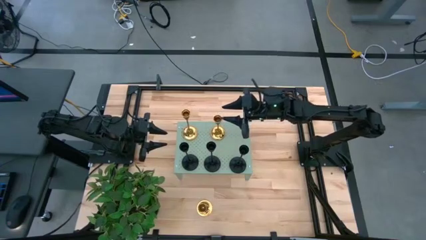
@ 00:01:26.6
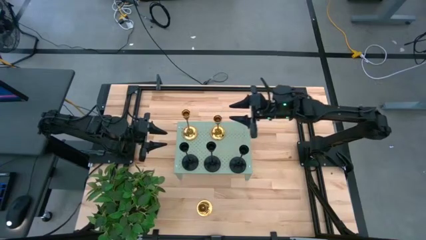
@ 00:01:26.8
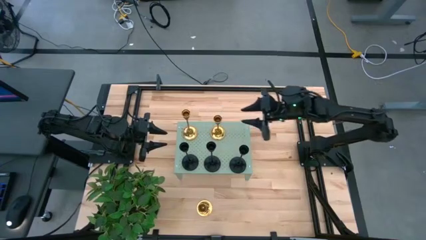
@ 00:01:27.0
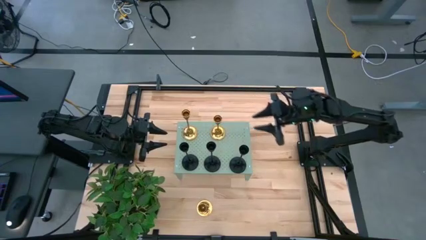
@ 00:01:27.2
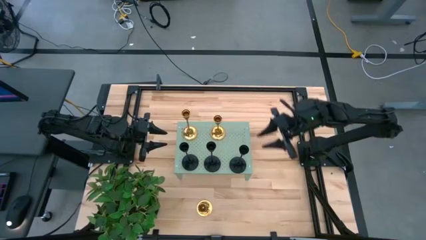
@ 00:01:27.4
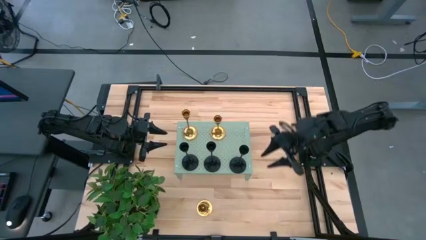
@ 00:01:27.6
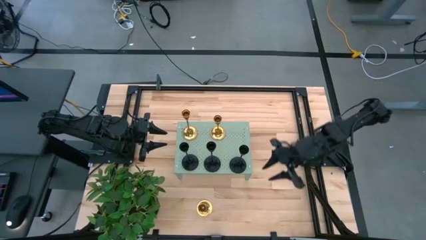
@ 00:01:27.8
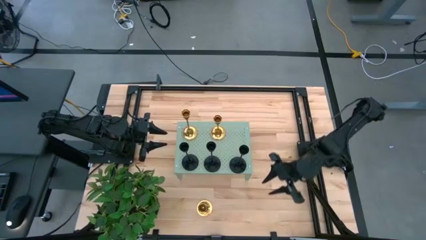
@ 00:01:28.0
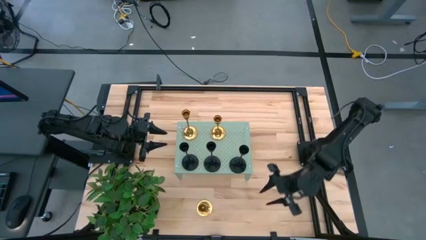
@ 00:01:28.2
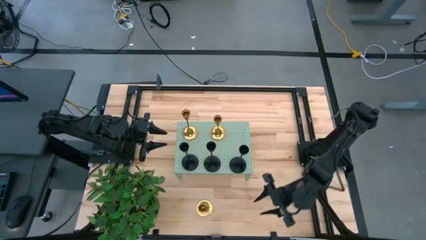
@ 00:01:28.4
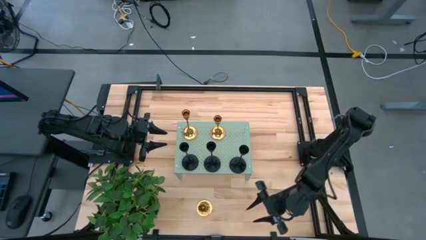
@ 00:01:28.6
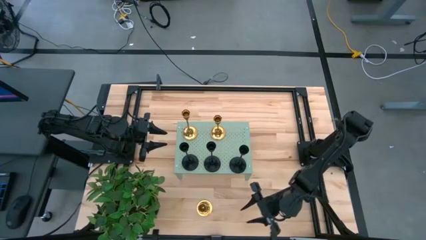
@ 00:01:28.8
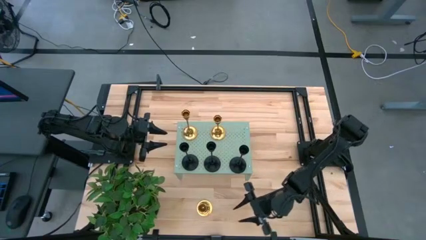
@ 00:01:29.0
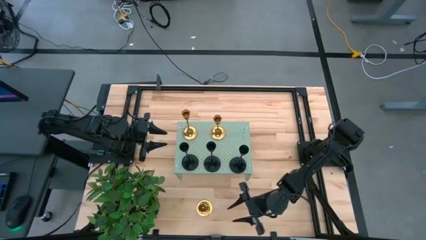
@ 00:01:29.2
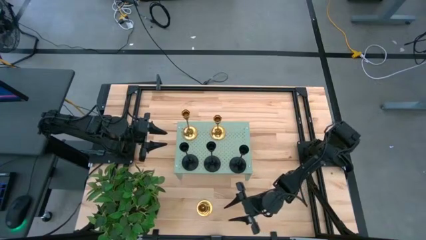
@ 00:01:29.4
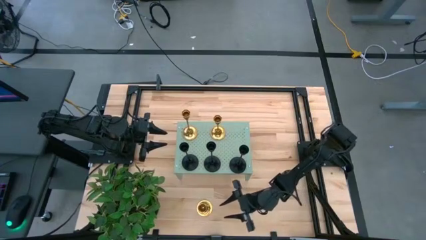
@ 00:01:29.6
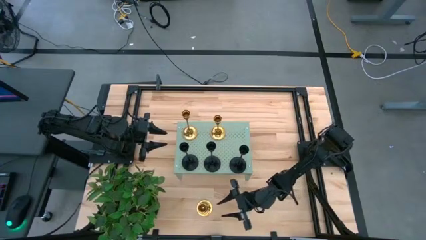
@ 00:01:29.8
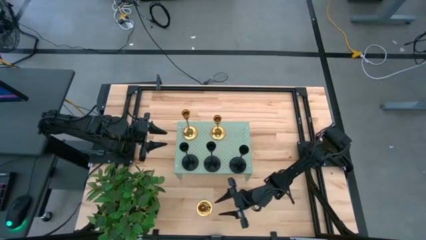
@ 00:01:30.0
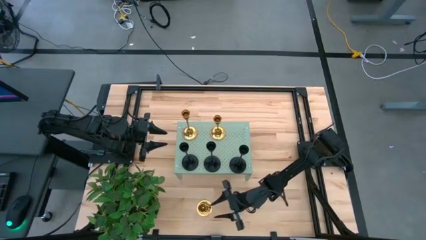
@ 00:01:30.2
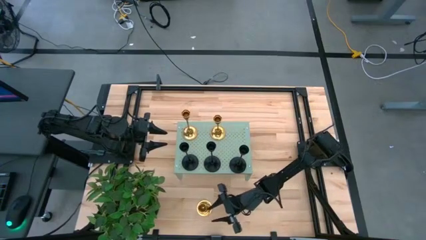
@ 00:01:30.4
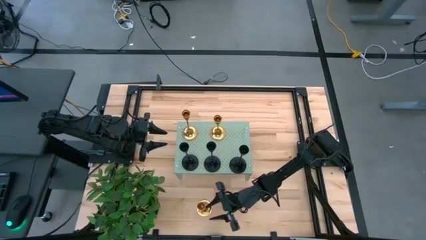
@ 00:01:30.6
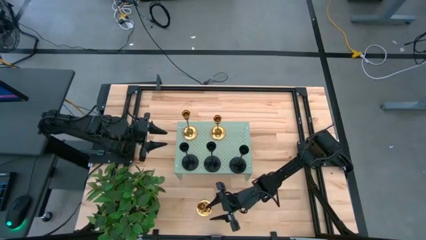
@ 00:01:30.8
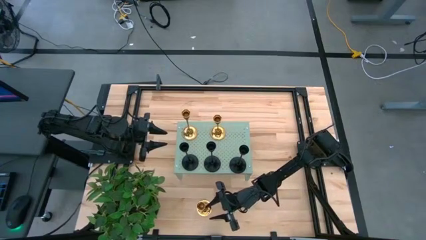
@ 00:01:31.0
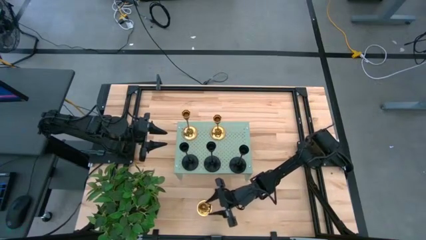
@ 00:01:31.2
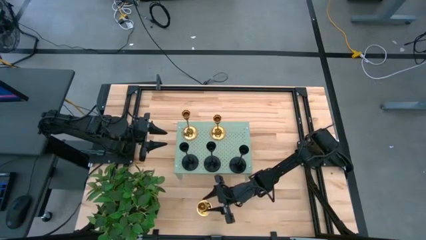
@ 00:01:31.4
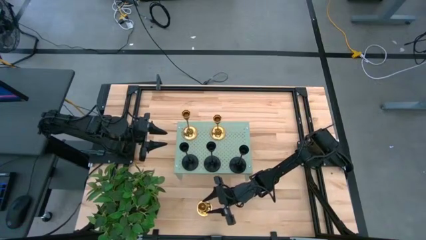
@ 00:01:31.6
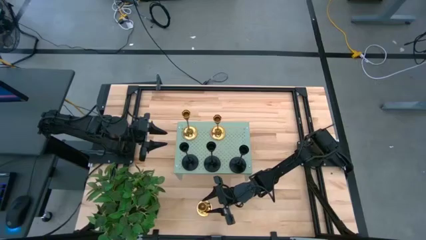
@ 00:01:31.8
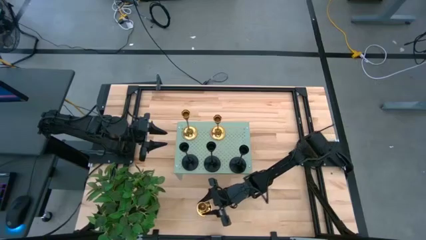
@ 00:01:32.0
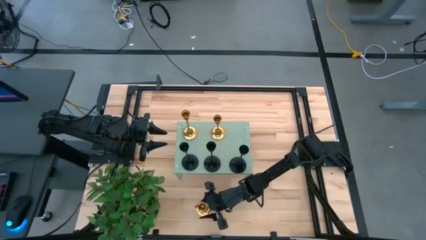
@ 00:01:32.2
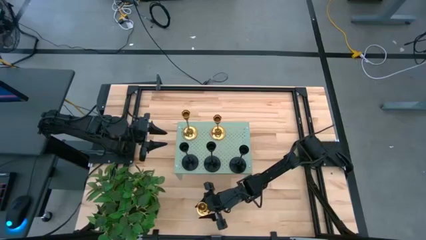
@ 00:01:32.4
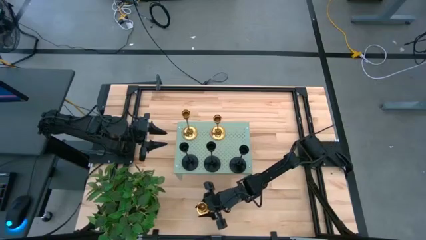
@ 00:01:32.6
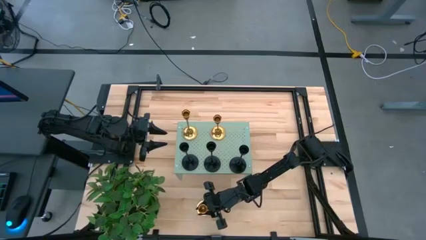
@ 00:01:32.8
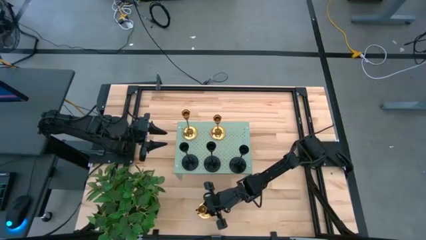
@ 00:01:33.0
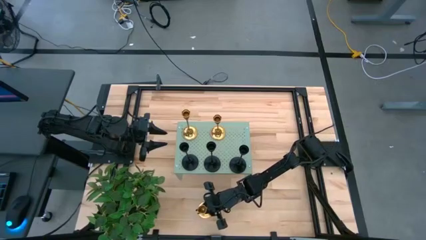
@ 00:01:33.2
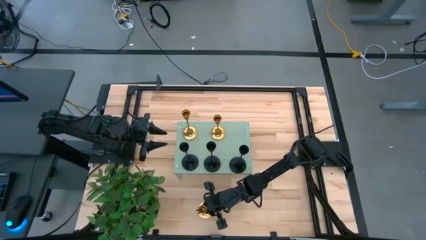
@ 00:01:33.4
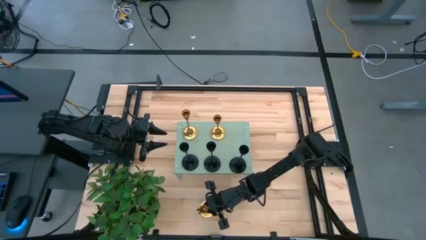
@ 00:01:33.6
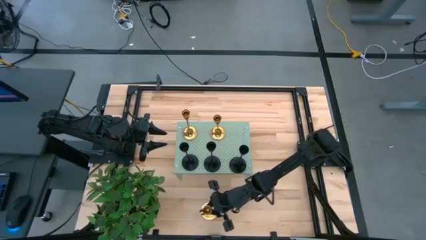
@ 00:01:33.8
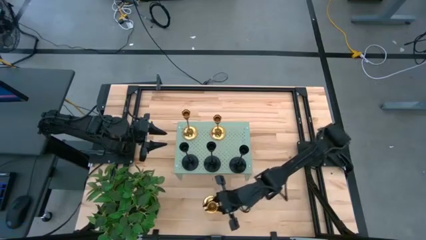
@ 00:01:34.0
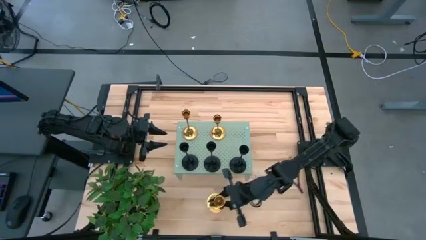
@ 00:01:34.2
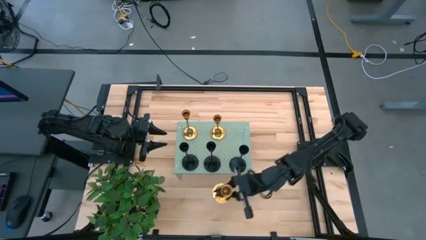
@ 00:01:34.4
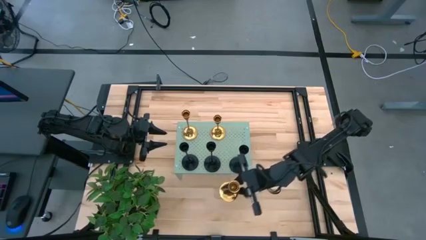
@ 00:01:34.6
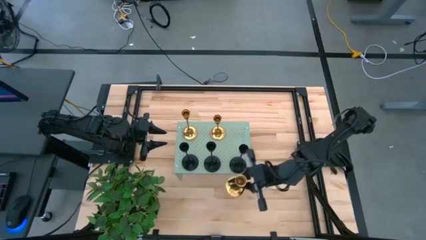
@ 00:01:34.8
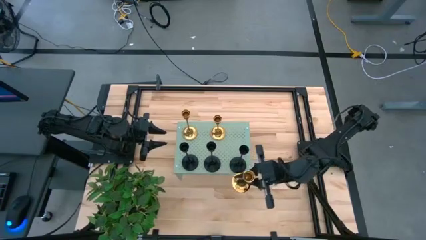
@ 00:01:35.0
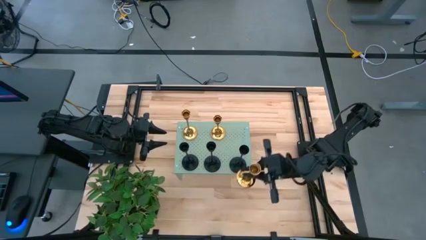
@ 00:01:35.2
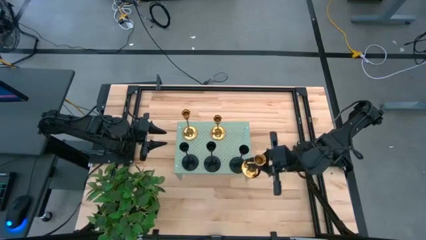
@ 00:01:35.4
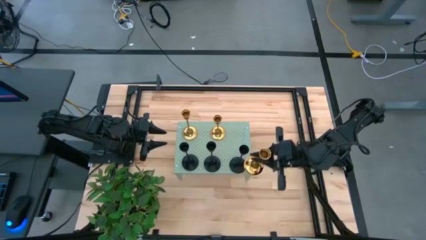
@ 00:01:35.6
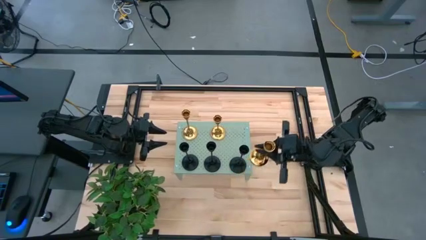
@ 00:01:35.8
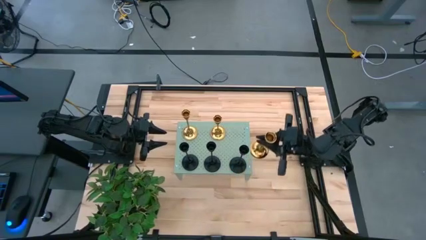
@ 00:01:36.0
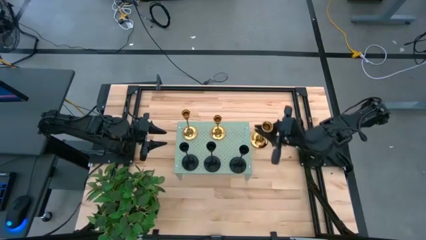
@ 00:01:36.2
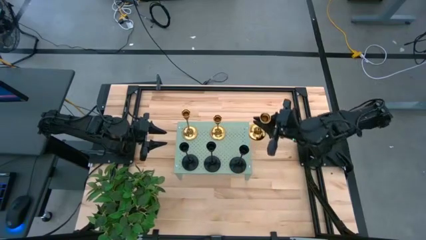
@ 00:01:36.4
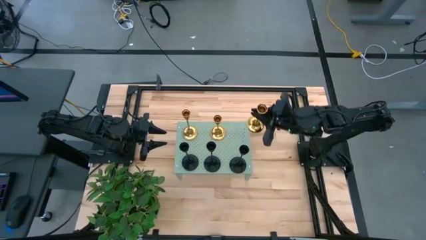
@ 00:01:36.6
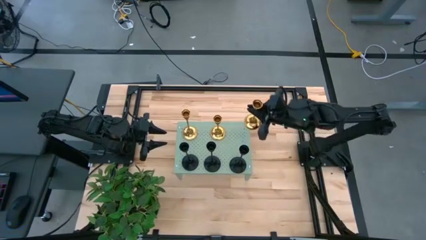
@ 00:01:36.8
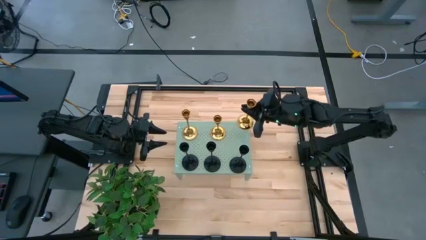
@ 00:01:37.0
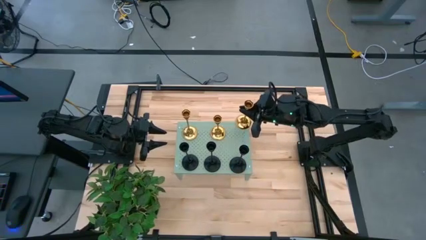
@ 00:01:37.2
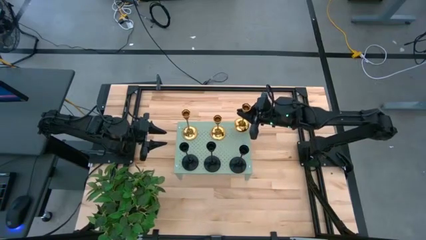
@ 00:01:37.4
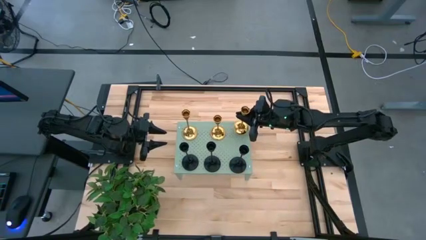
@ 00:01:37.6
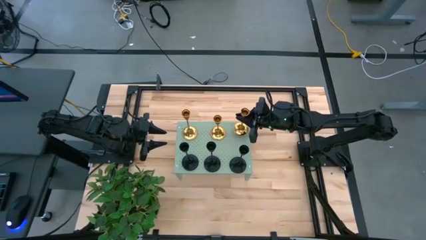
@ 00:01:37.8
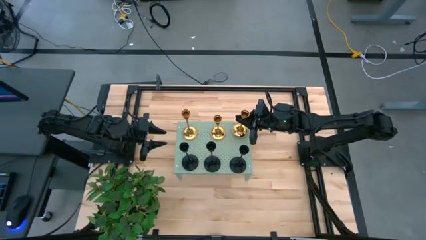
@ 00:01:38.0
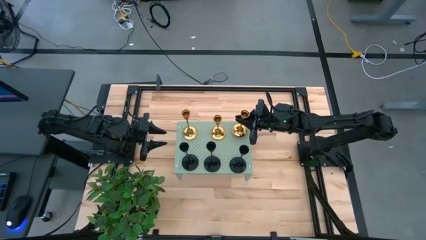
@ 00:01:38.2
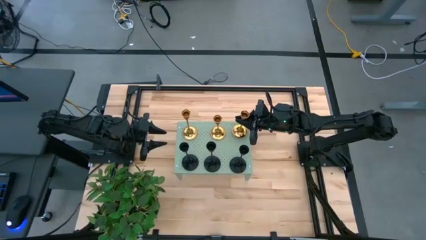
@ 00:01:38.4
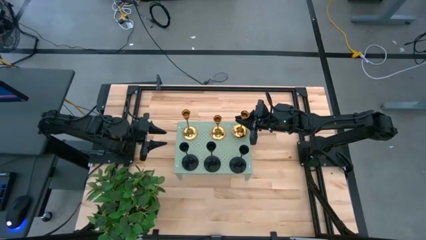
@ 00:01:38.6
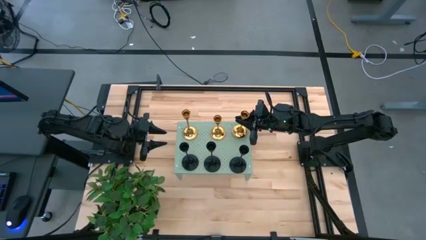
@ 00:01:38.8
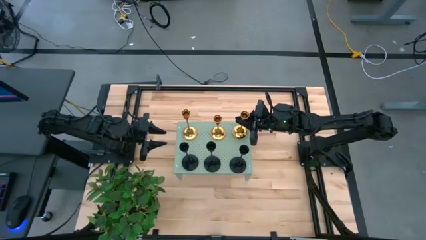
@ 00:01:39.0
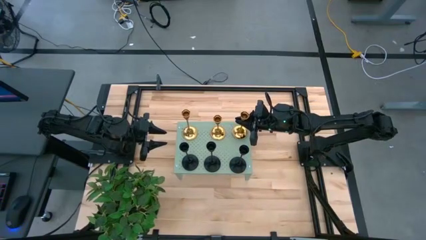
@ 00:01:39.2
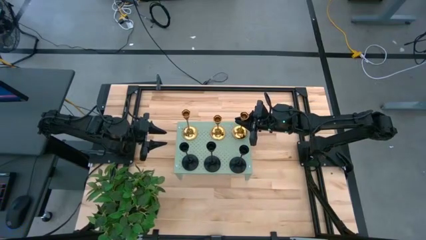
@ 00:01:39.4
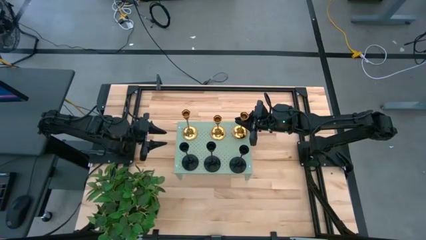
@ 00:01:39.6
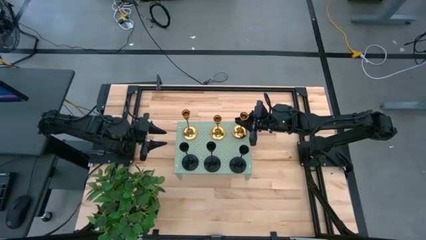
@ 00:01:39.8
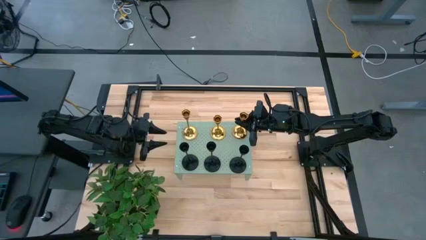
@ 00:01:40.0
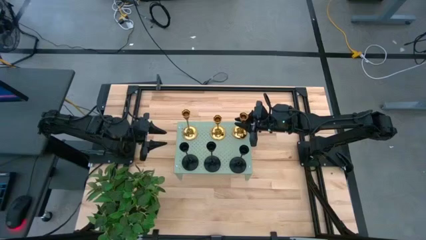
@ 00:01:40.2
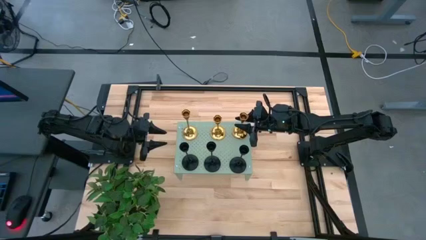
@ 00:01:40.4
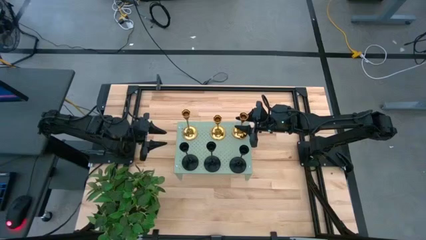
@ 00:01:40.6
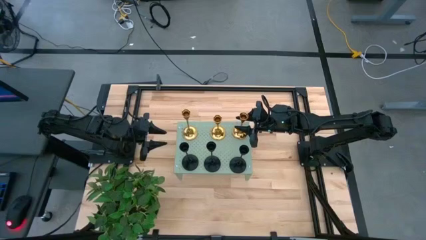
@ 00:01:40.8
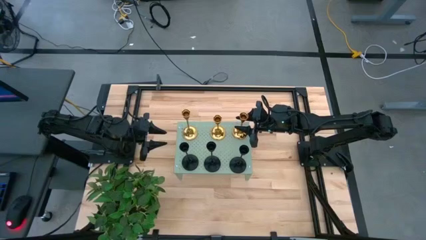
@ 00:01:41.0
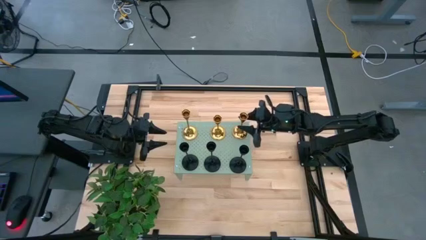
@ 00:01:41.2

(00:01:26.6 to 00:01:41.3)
Task: Pick & Place candle stick holders
Put the golden candle holder aligned with the black candle holder on the shelf
